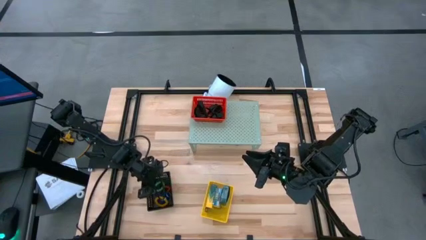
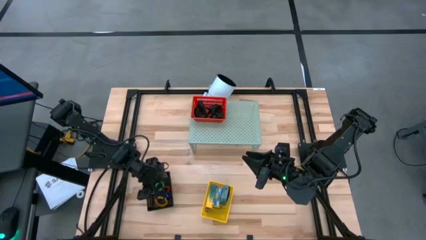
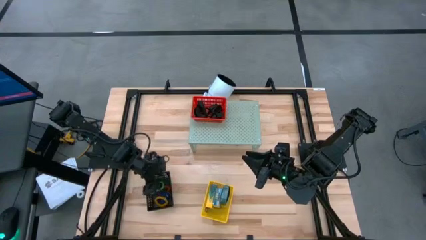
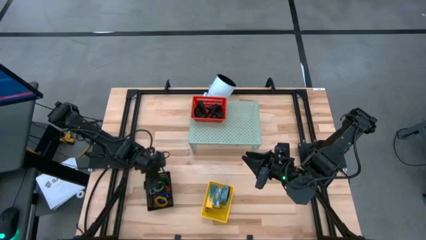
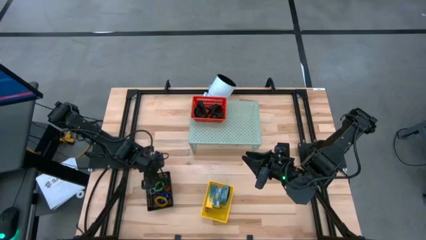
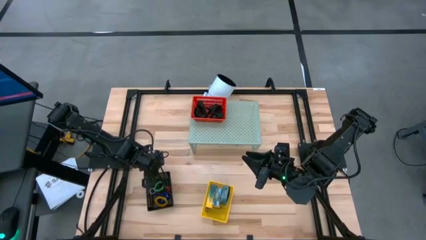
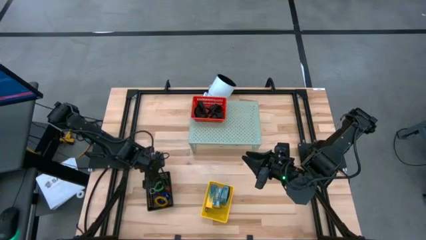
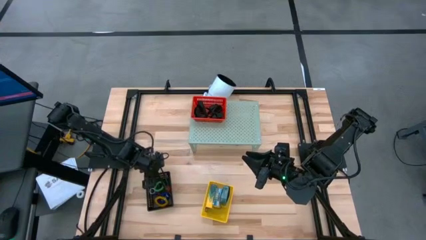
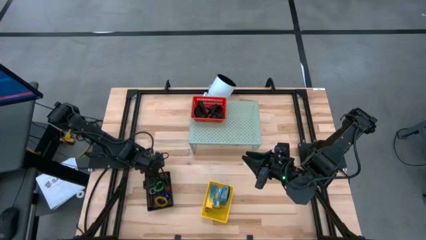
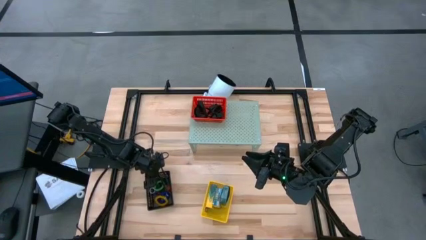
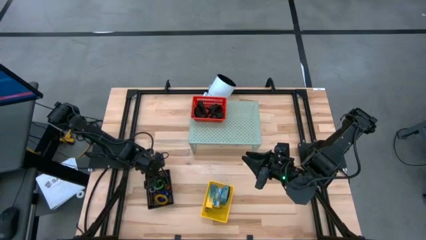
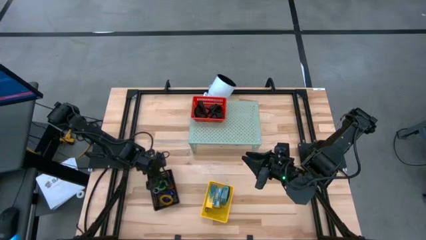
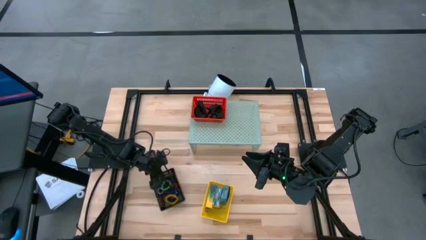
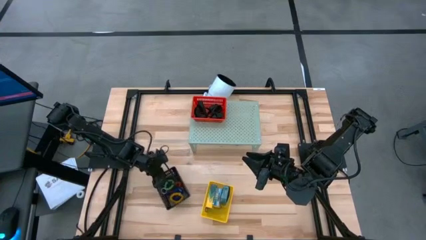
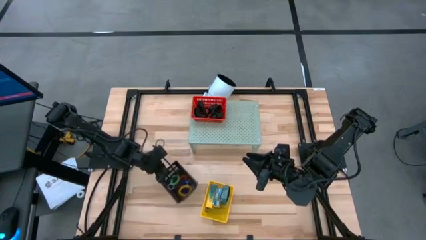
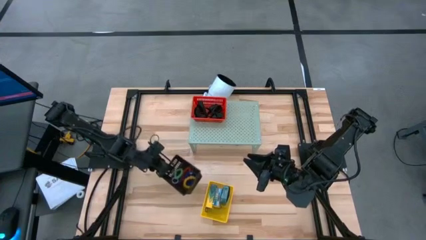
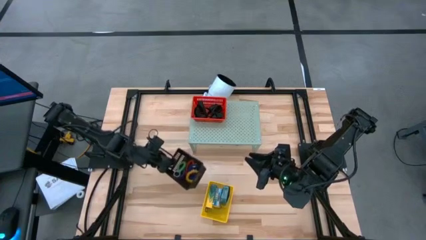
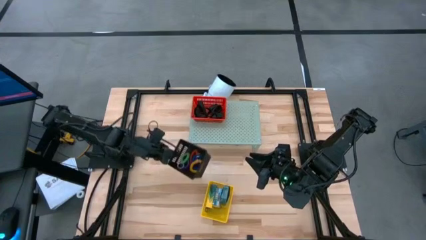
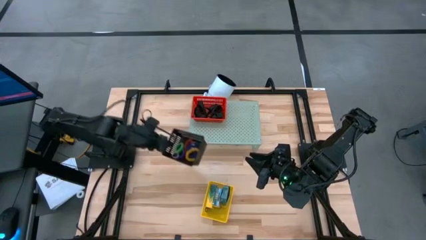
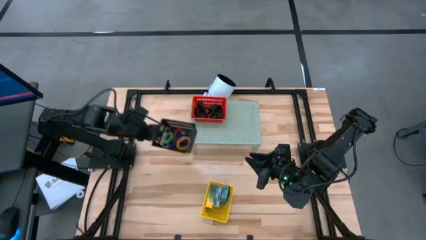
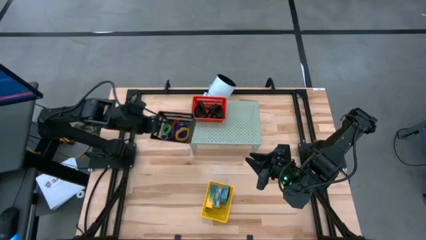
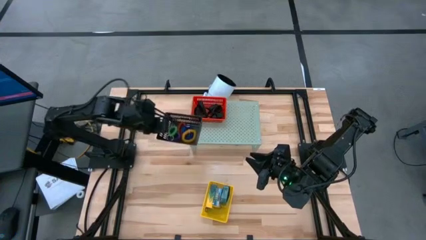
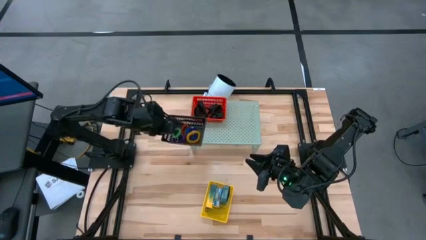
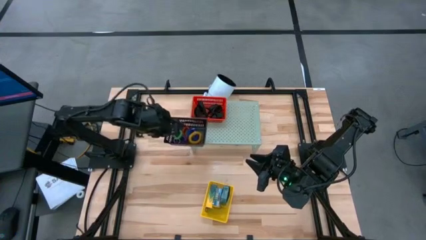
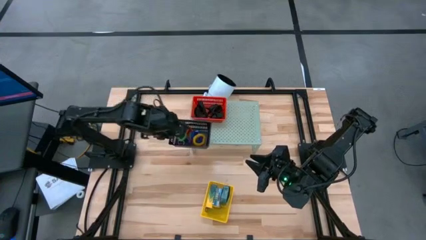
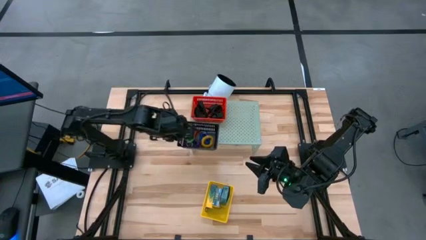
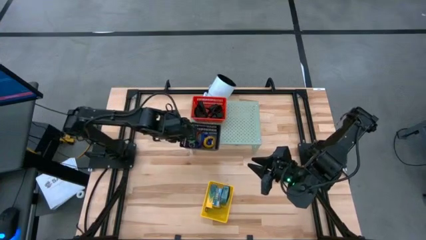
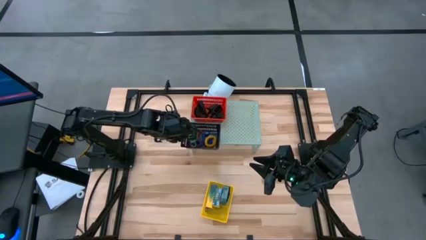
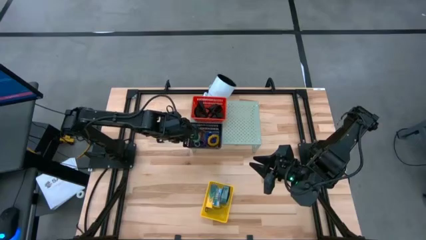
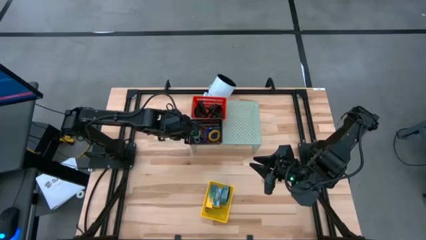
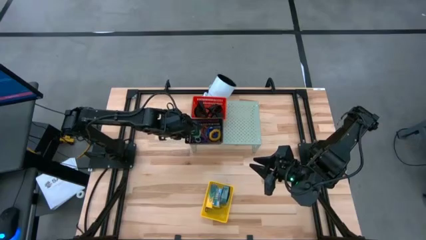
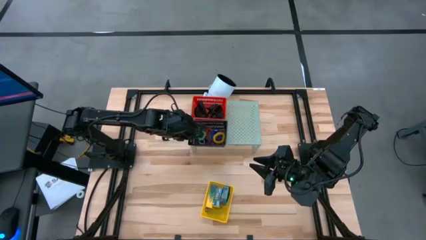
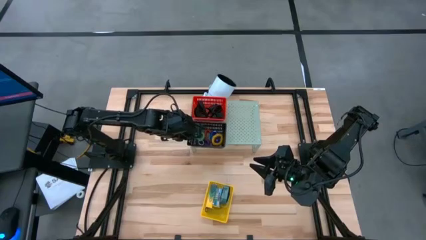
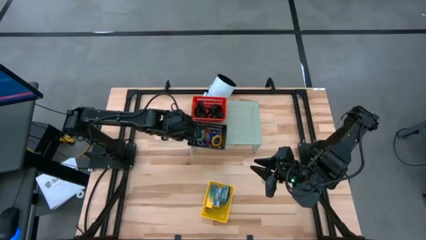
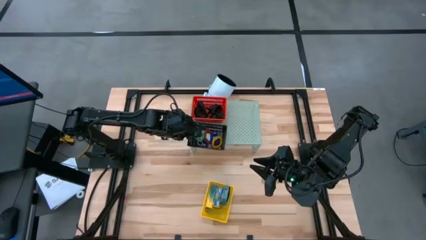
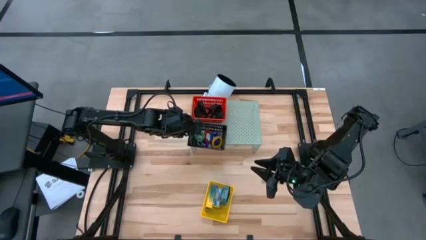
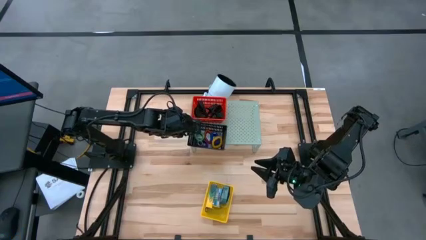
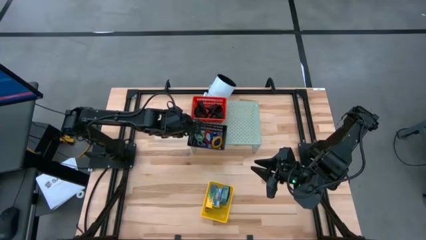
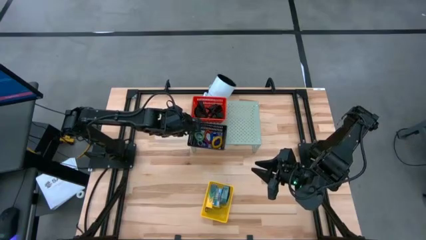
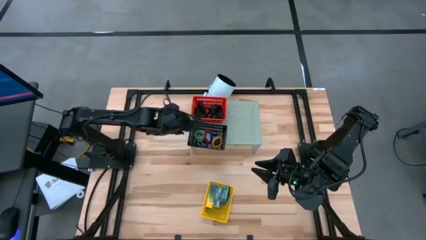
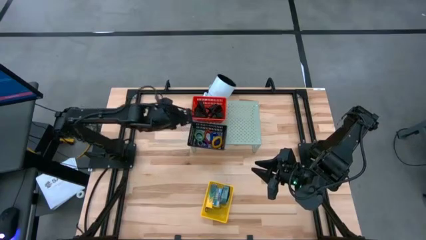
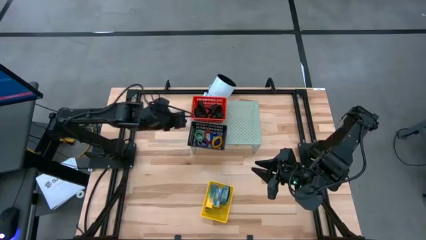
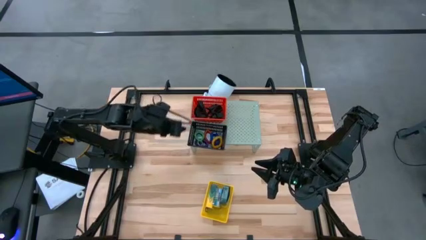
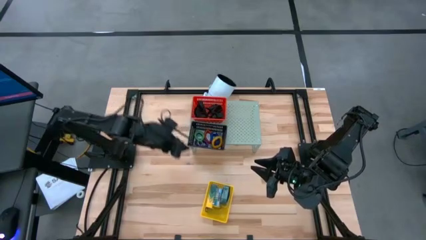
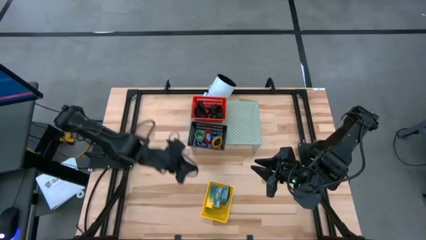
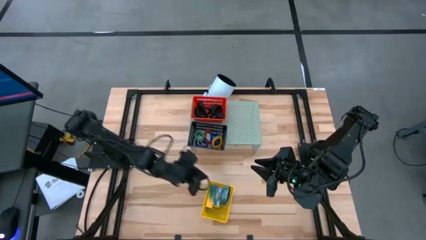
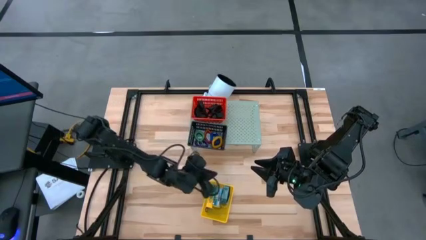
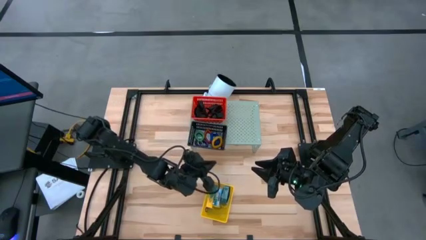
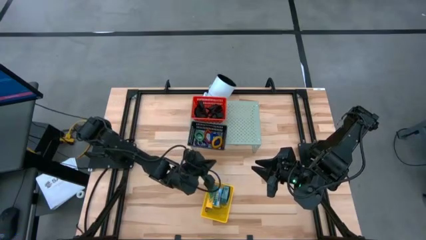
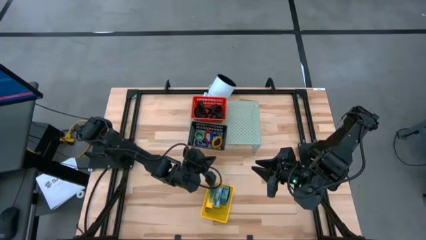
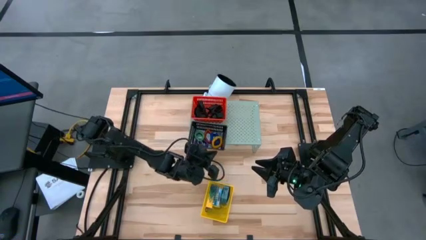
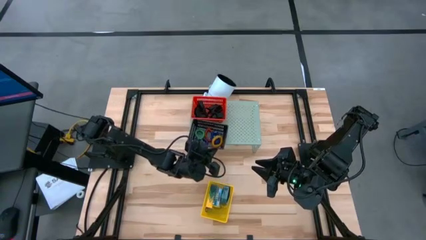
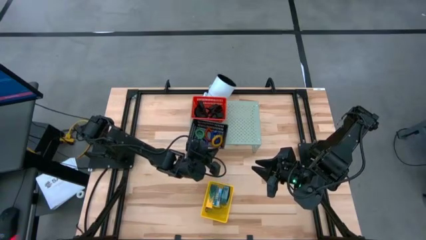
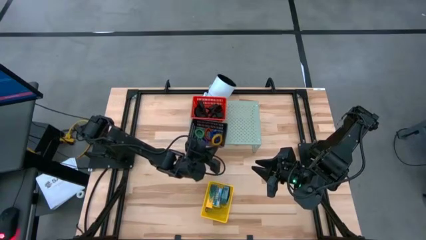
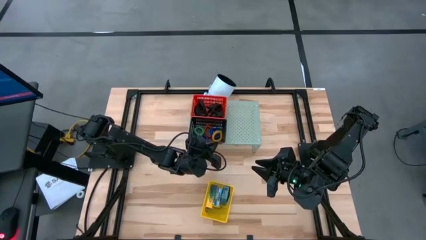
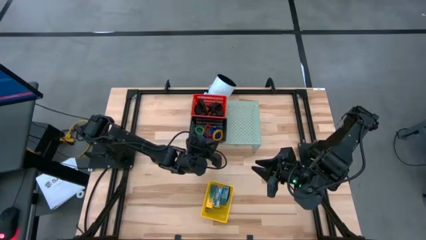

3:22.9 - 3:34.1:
Task: Pick & Place Office Desk Supplies
Put the black bin on the shelf

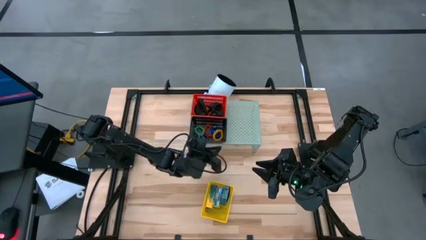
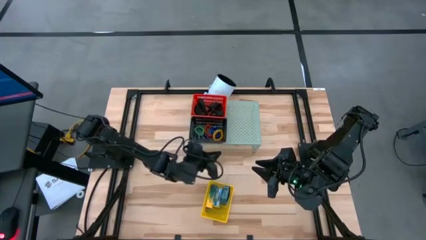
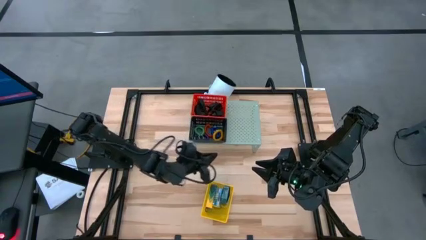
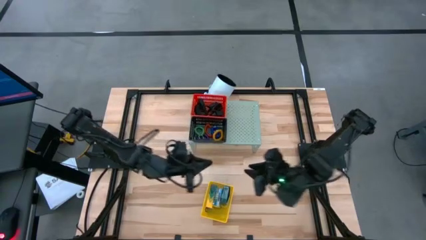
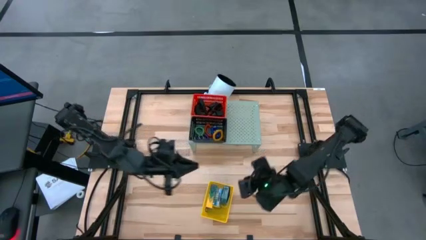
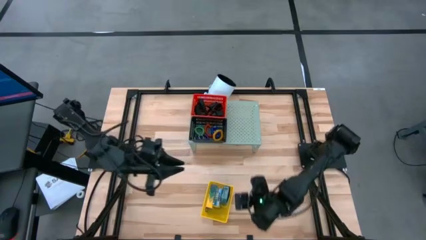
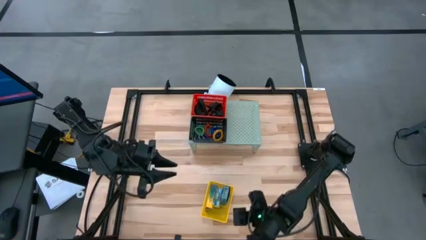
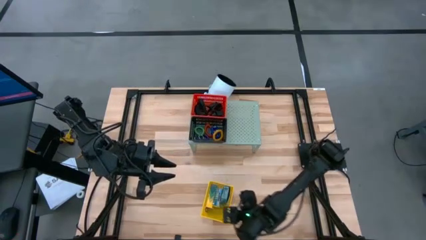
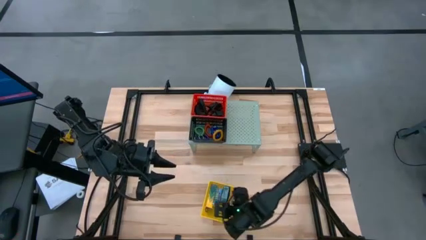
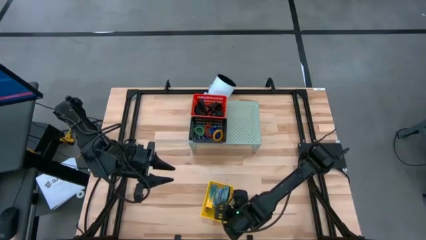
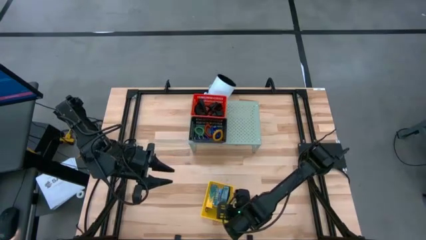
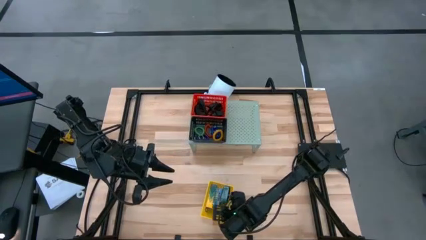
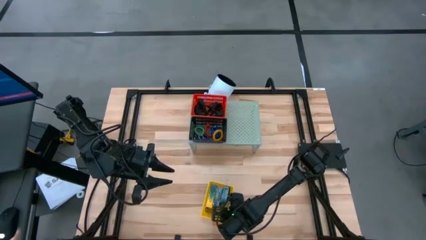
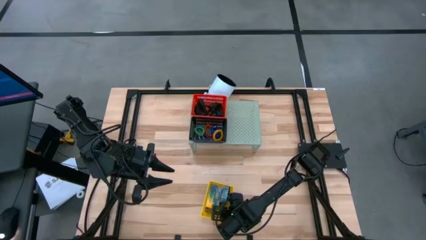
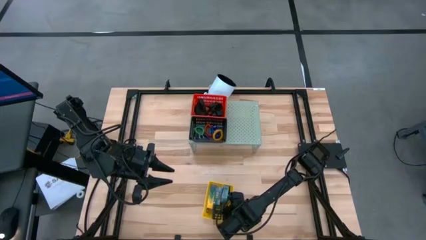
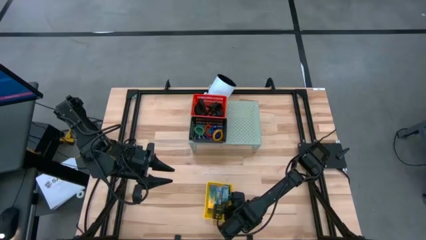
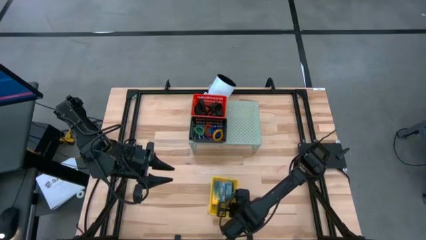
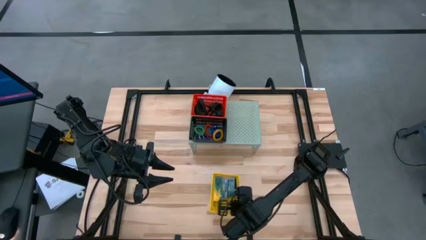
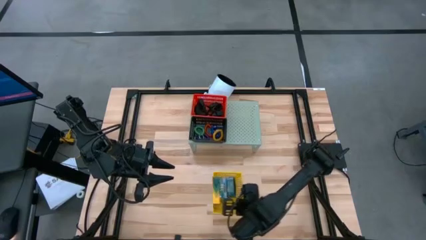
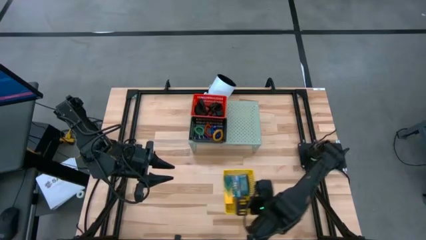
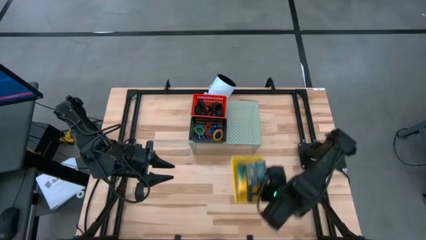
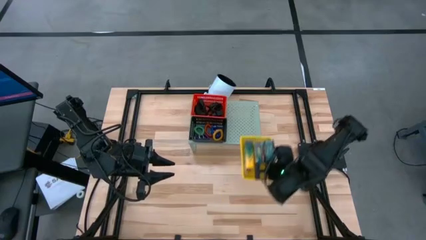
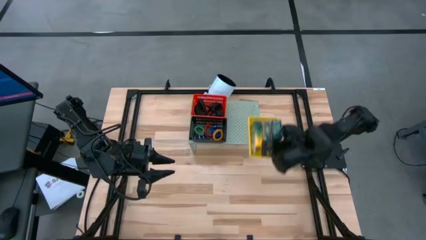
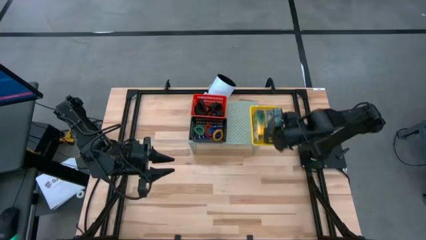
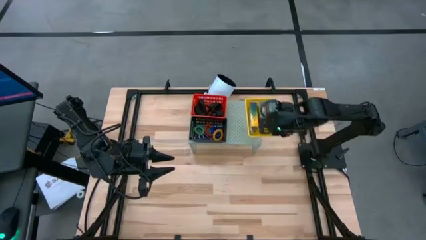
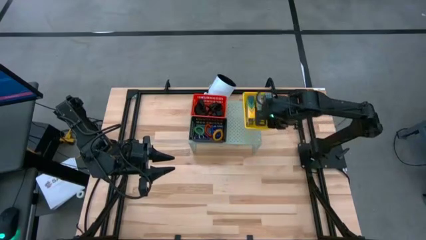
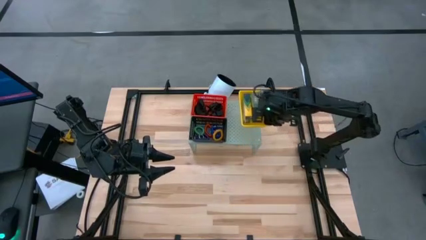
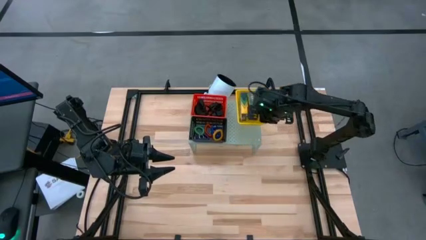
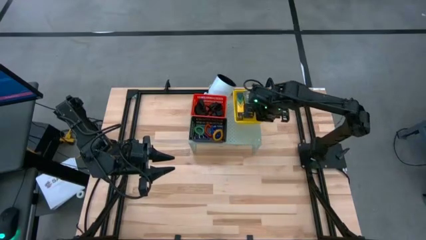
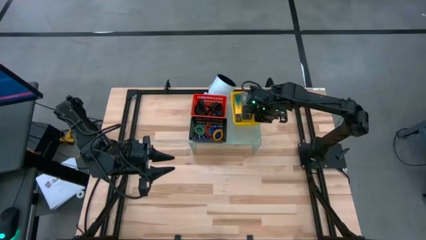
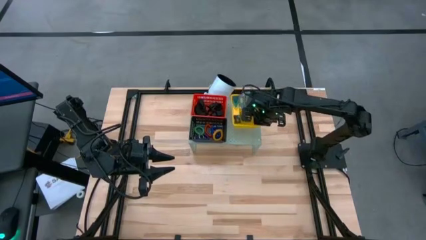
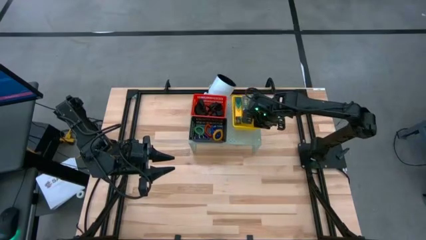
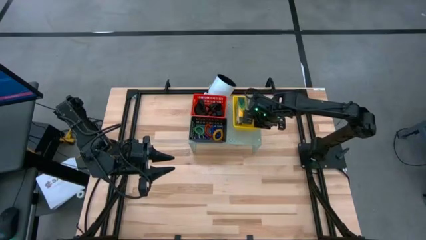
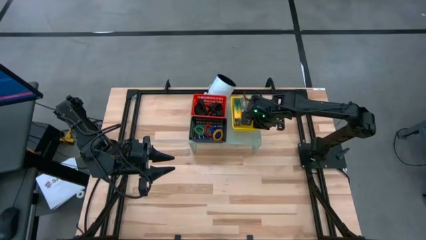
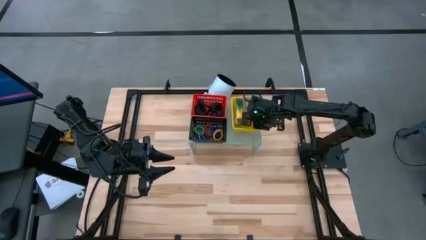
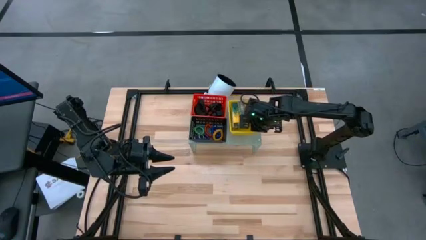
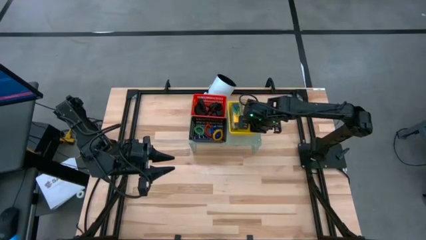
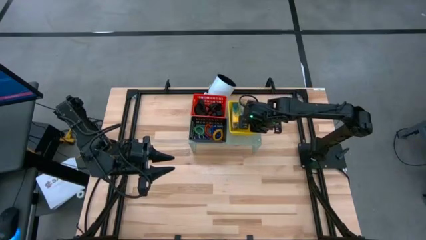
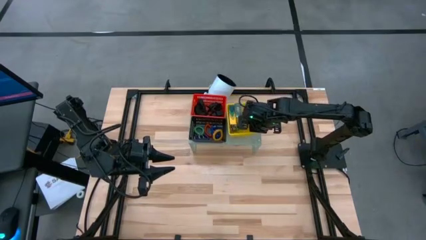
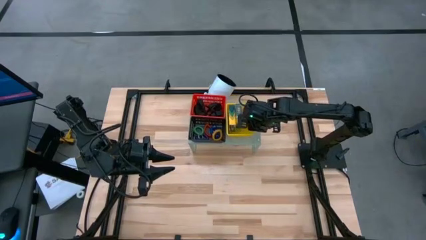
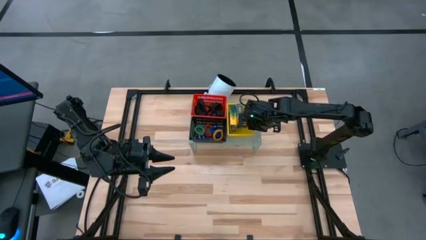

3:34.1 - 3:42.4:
Put the yellow bin on the shelf
